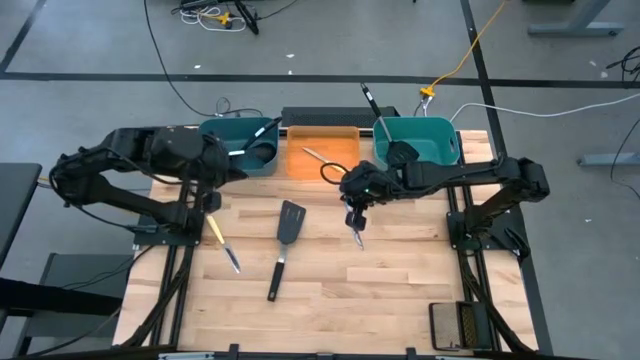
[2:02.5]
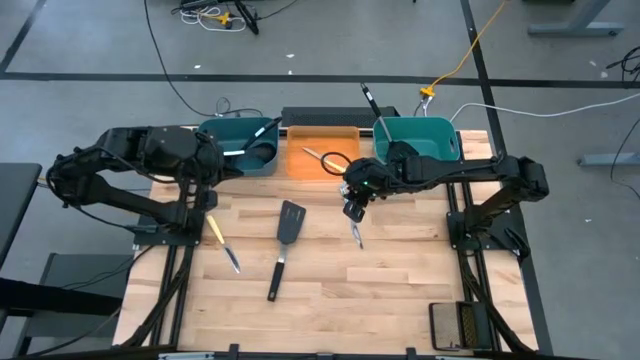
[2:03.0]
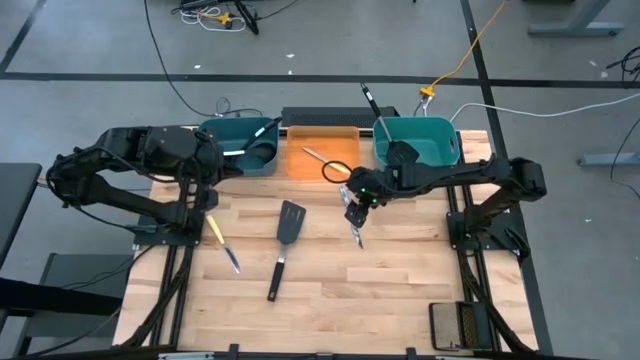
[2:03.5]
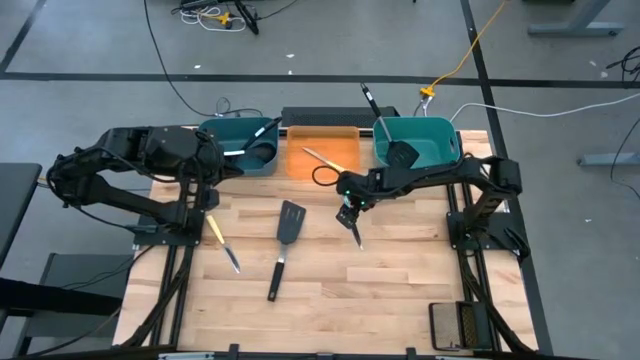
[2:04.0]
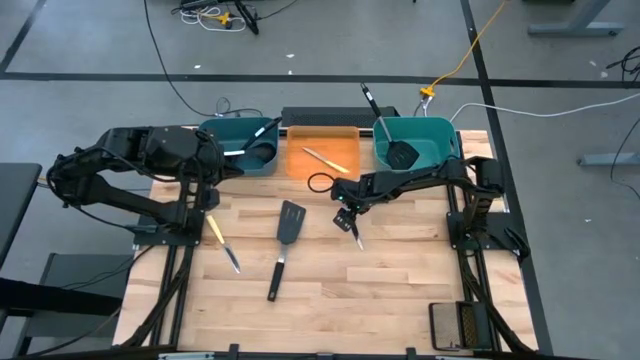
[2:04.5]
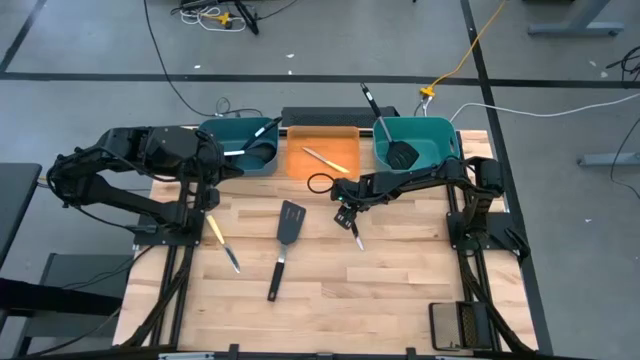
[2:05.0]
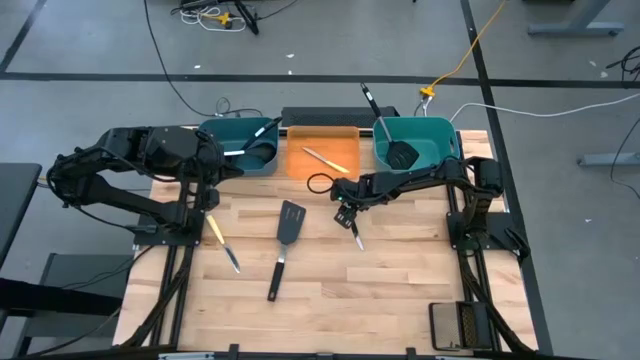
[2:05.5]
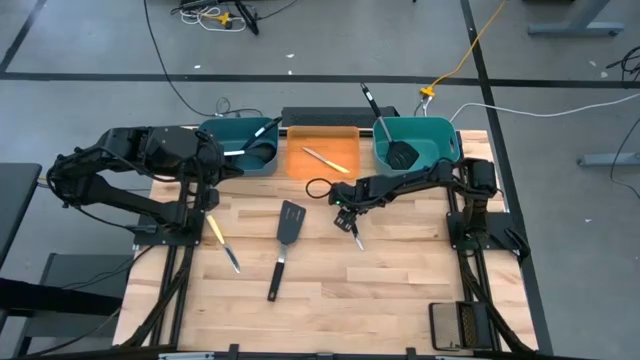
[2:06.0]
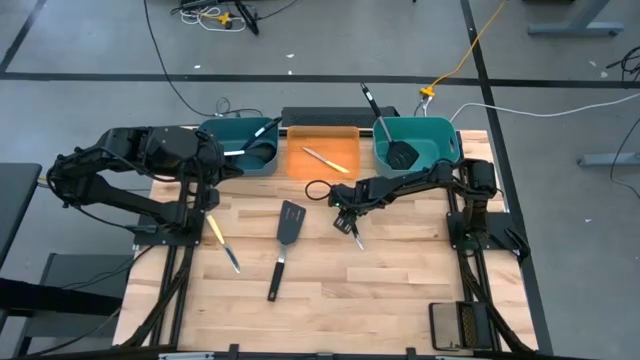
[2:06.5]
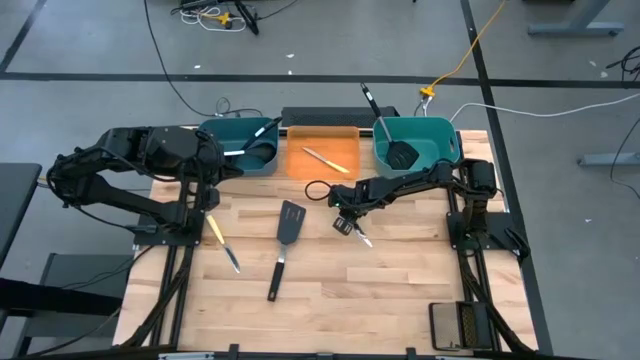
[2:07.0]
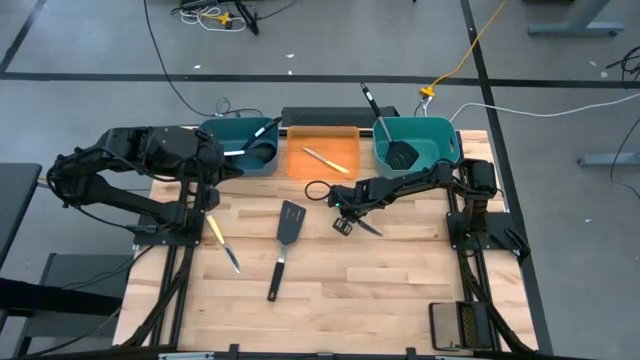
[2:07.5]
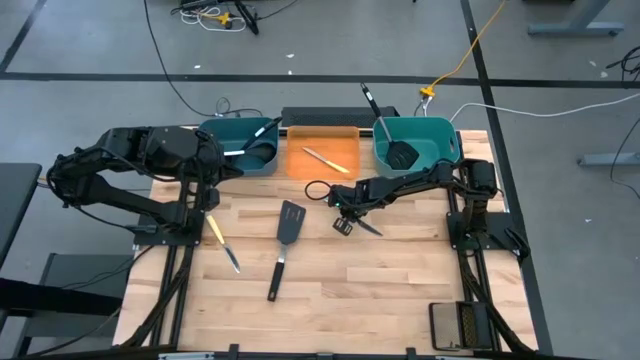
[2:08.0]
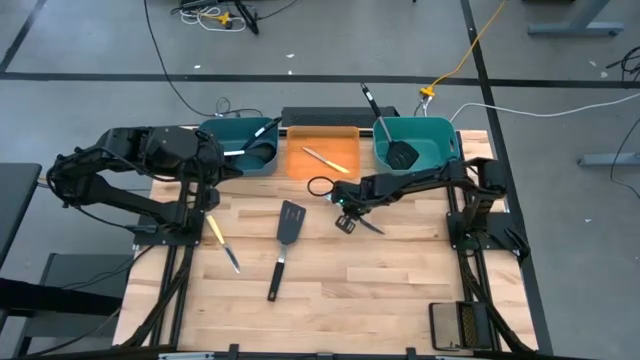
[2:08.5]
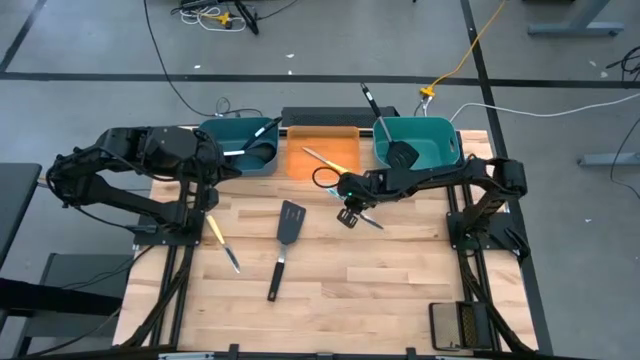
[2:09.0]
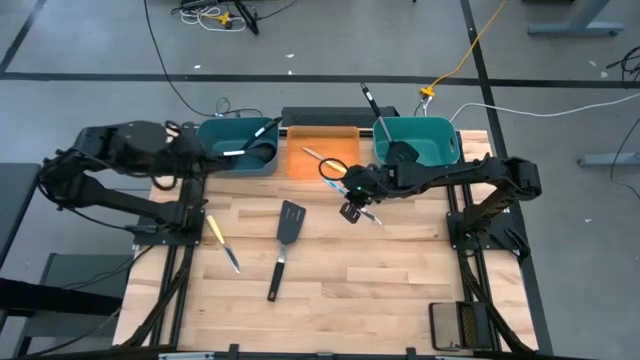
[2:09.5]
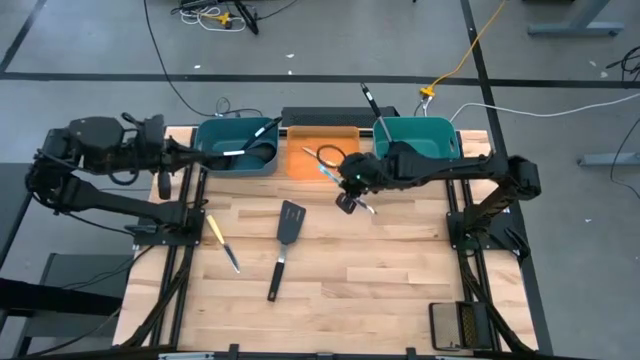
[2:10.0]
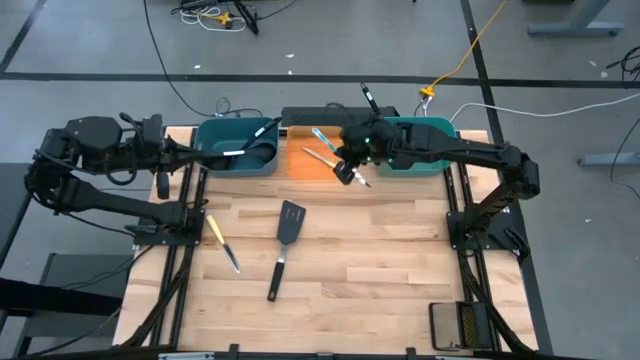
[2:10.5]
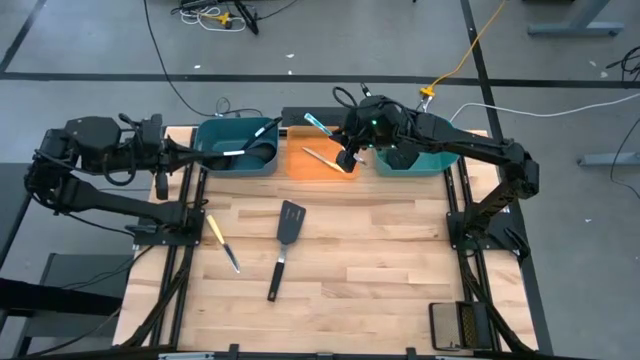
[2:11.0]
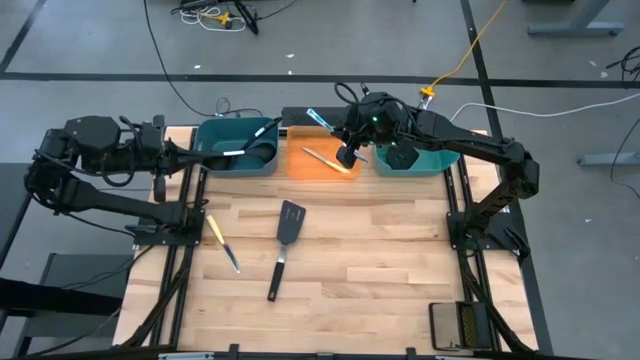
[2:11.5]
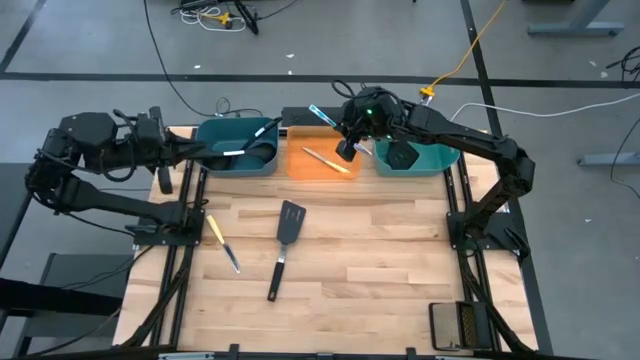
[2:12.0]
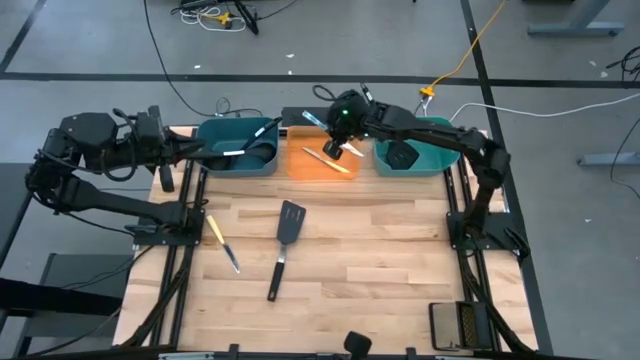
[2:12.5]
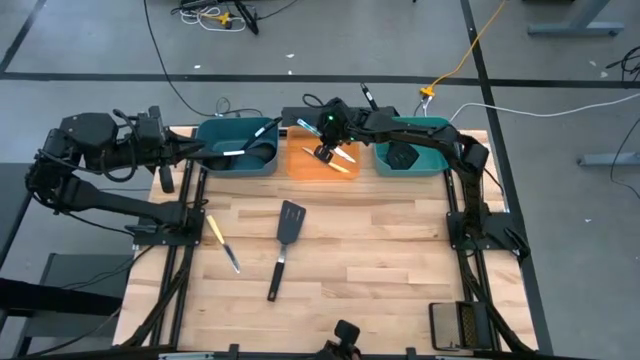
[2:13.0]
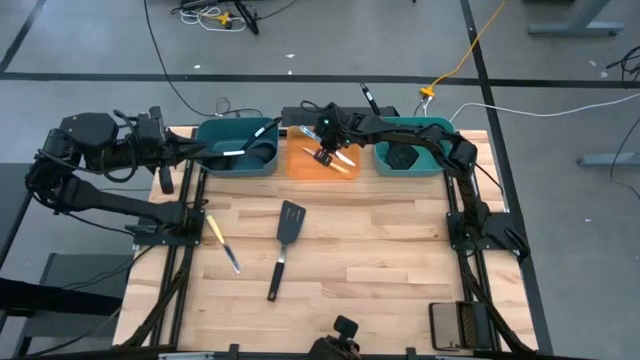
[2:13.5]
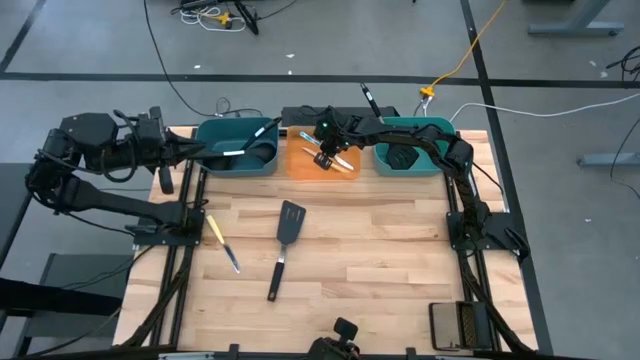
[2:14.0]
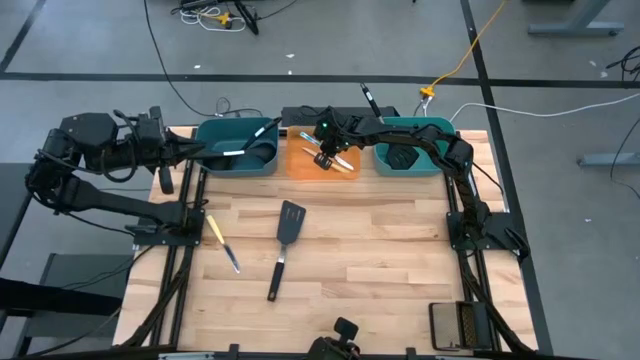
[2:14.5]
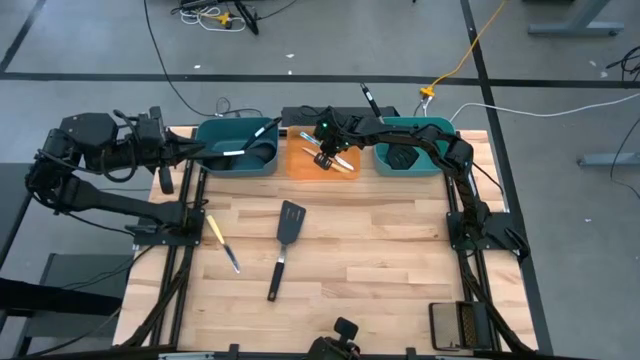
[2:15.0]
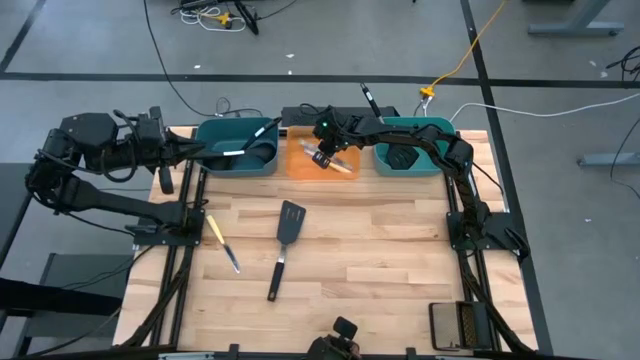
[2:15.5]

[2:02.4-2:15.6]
Task: Pick & Place Kitchen Items
Put the white knife into the orange bin

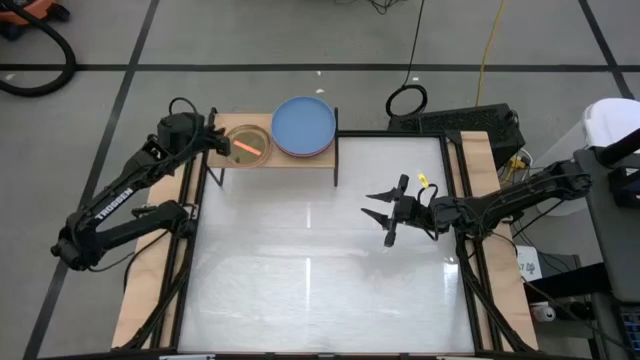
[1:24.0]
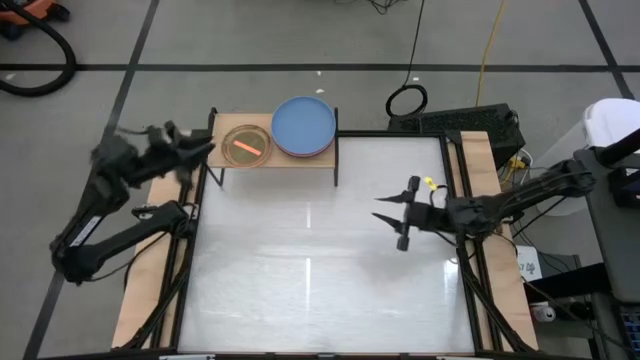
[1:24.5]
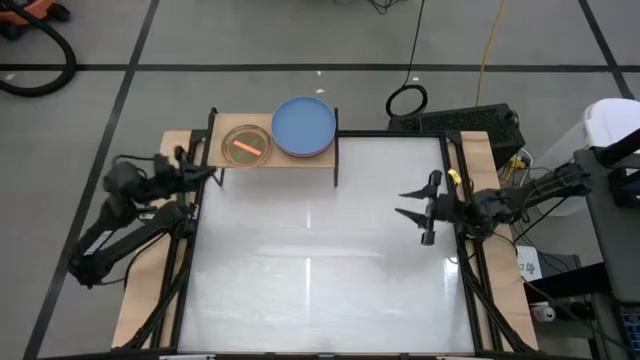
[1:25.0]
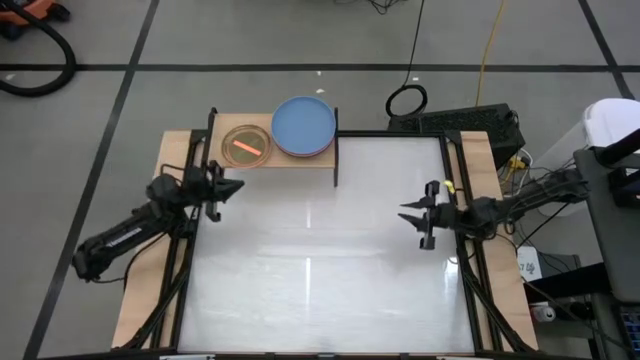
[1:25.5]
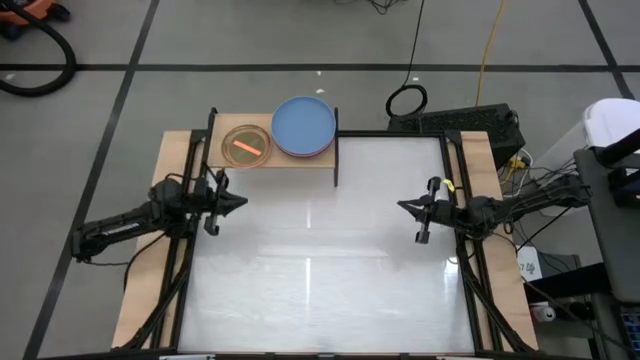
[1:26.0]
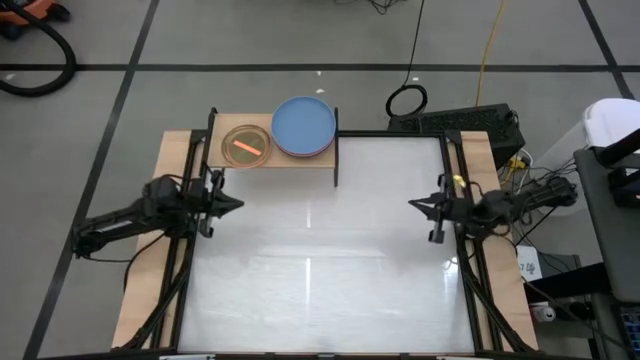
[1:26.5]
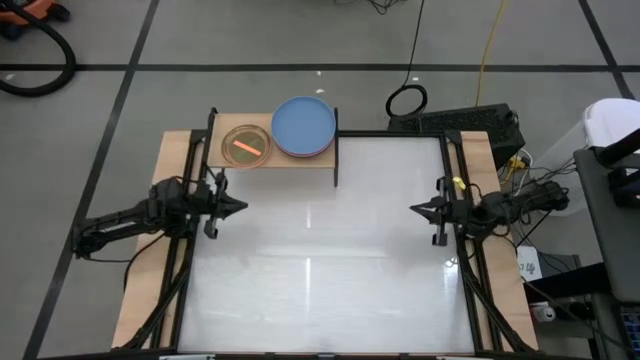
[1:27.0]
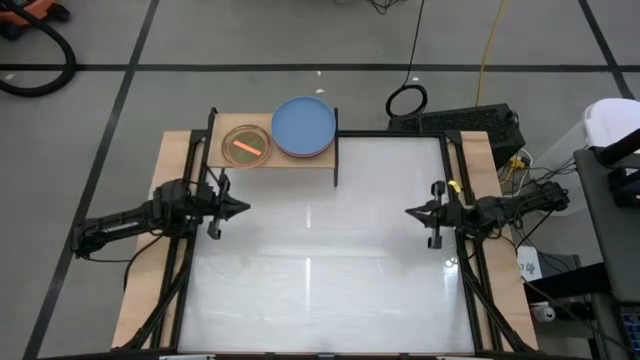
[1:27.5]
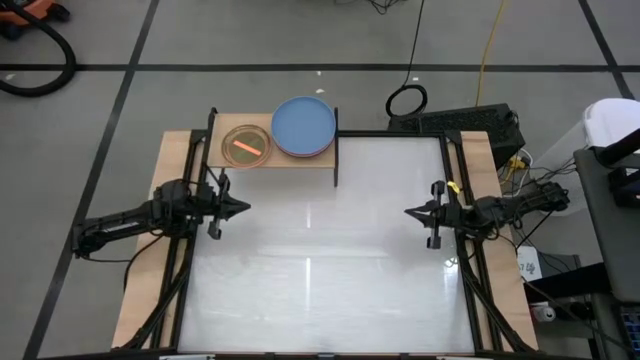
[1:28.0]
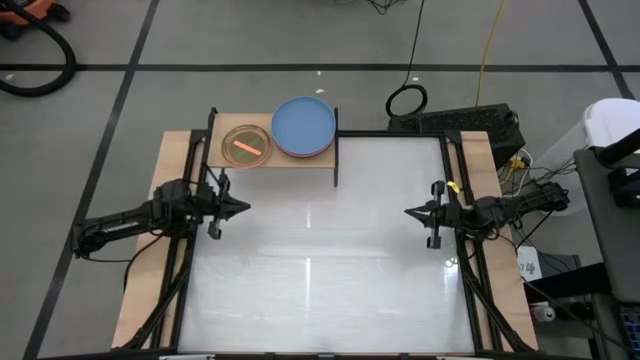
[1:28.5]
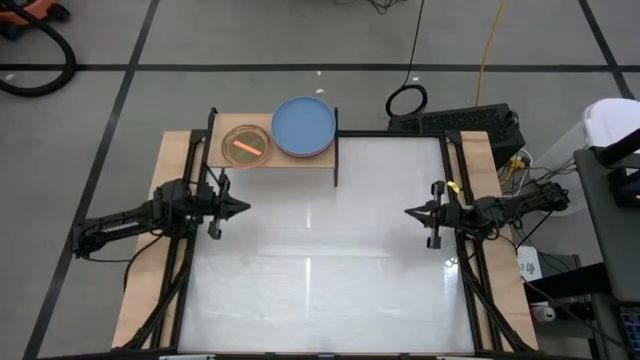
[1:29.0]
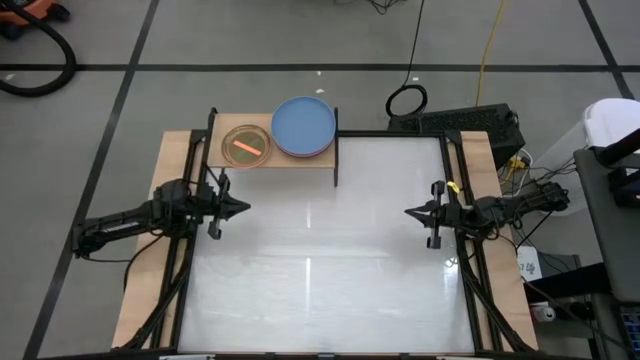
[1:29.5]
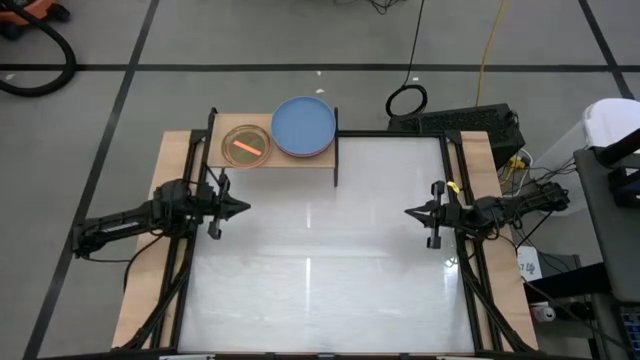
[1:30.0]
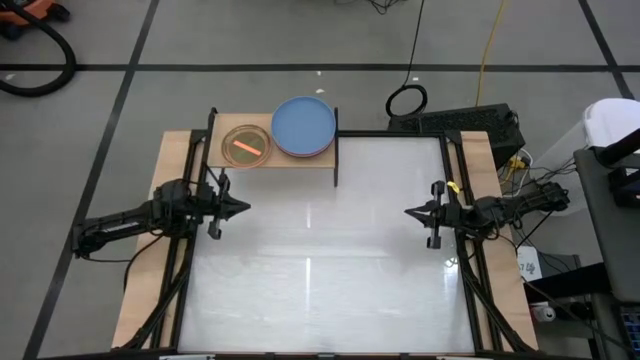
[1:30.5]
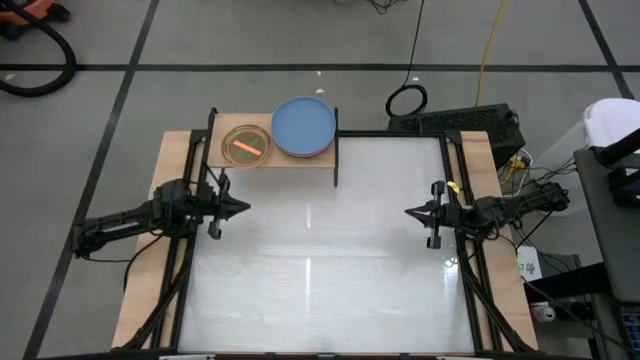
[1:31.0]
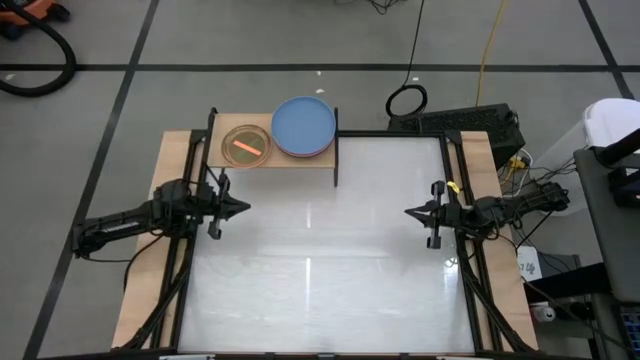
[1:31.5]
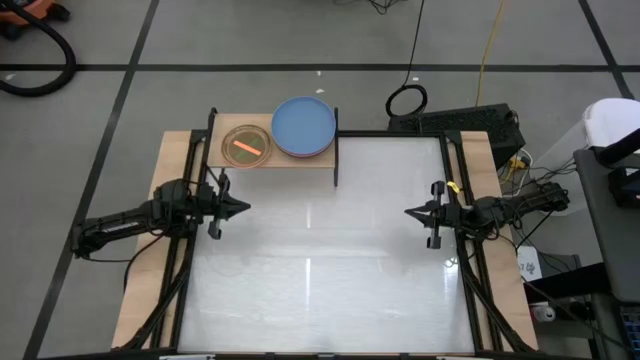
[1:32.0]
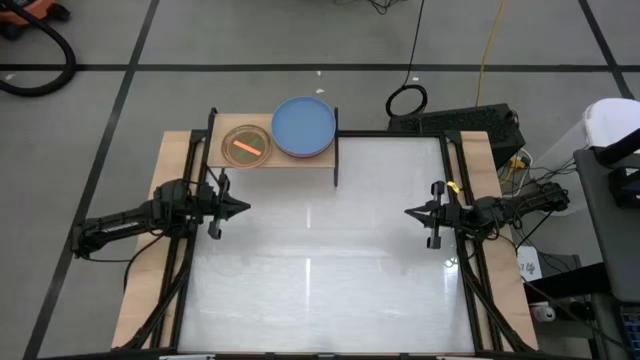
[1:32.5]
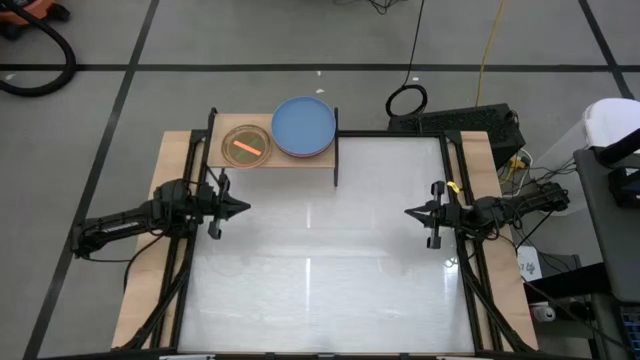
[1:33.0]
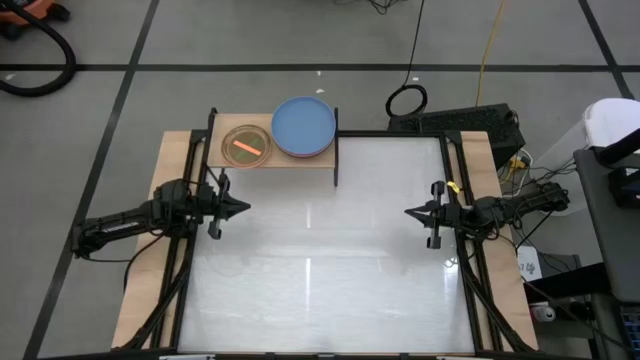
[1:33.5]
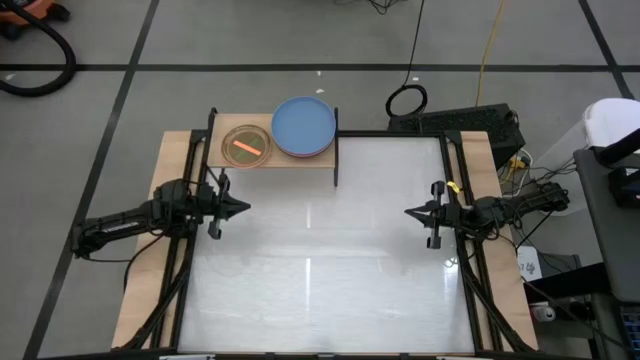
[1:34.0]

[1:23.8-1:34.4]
Task: Place and stack plates onto a shelf
Return to Home Position
